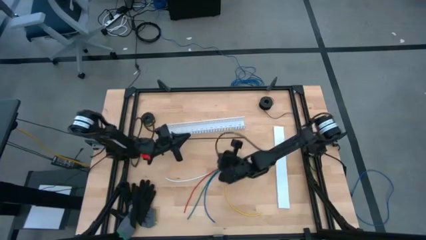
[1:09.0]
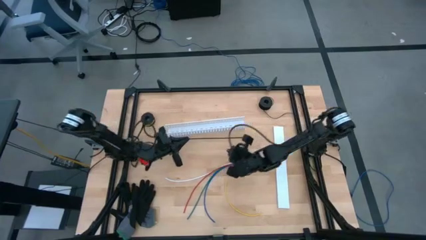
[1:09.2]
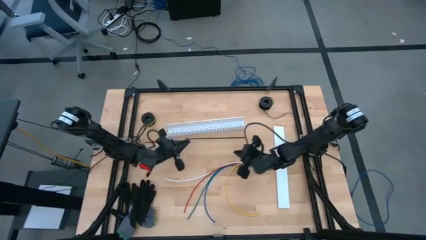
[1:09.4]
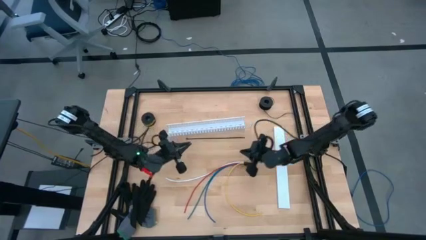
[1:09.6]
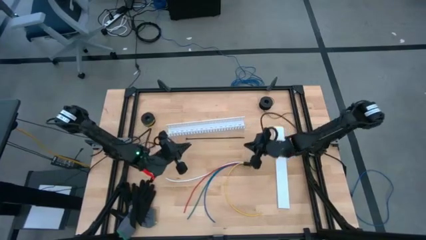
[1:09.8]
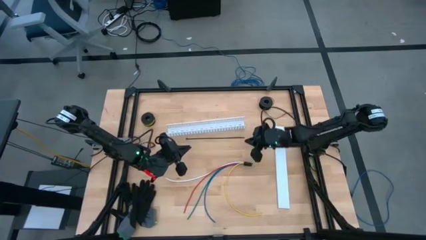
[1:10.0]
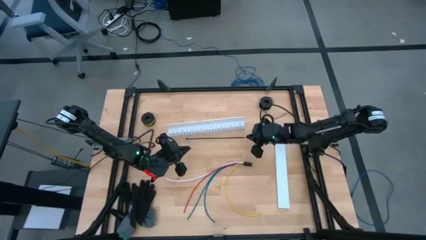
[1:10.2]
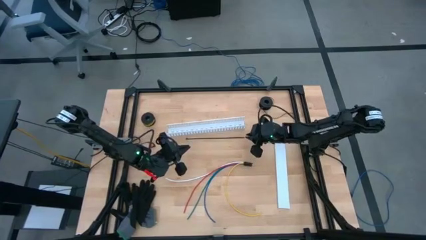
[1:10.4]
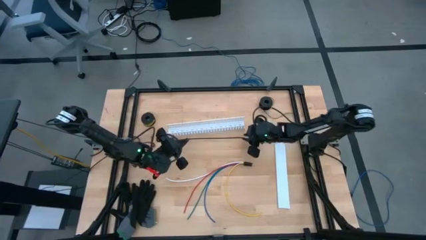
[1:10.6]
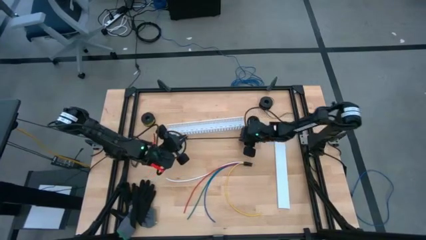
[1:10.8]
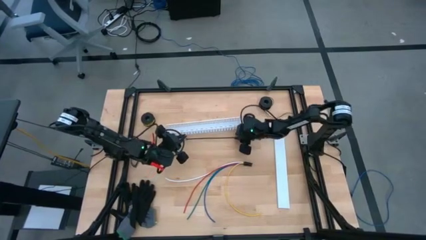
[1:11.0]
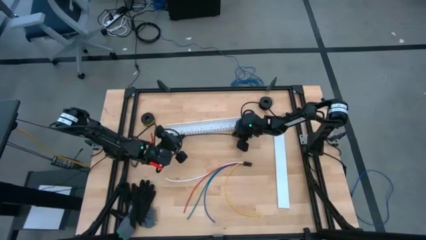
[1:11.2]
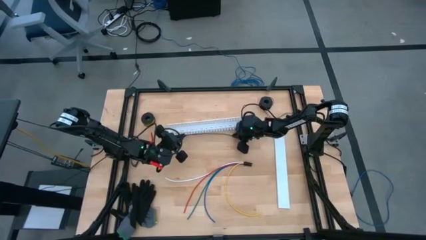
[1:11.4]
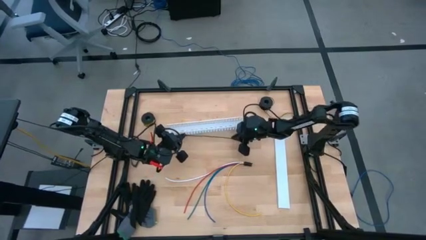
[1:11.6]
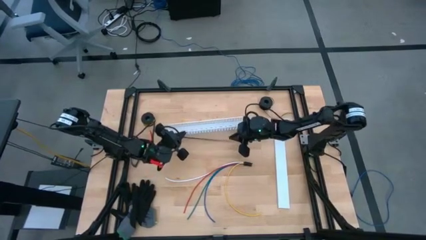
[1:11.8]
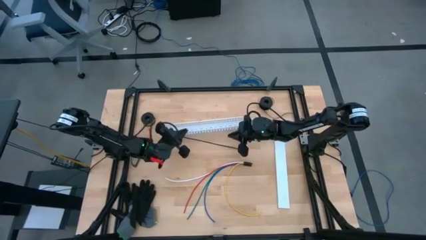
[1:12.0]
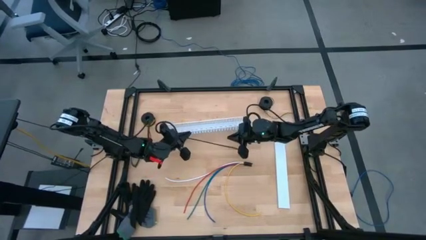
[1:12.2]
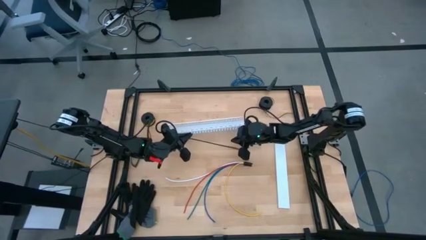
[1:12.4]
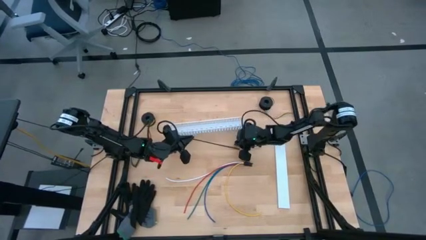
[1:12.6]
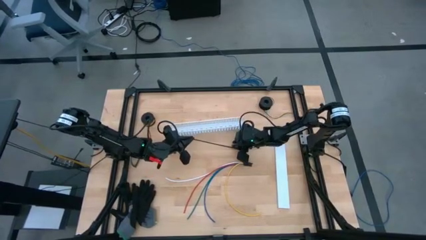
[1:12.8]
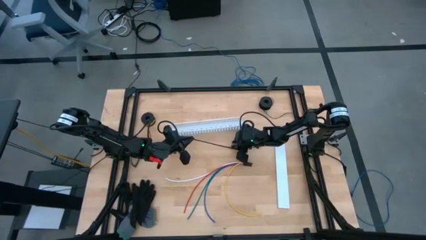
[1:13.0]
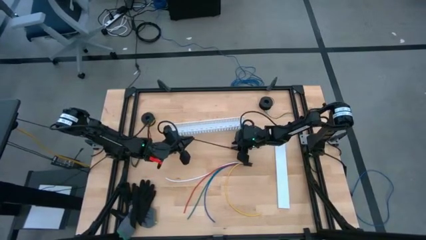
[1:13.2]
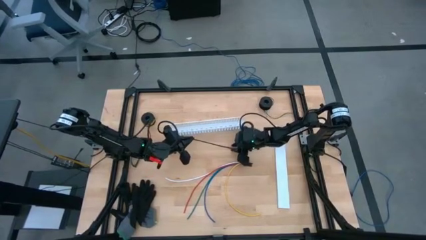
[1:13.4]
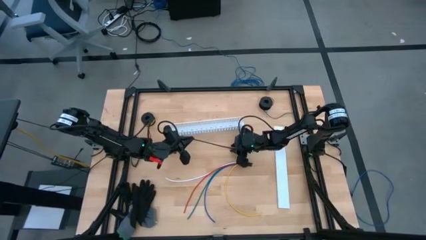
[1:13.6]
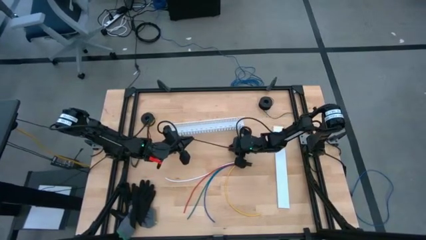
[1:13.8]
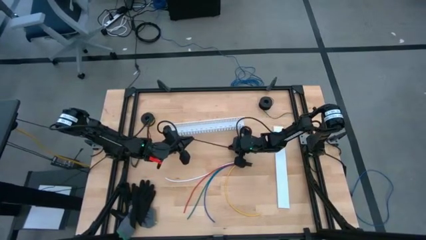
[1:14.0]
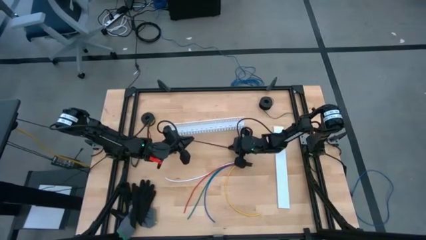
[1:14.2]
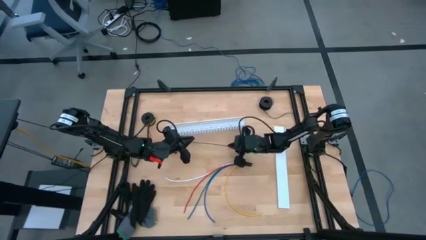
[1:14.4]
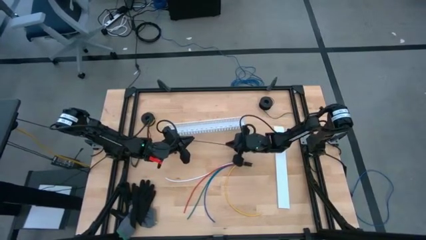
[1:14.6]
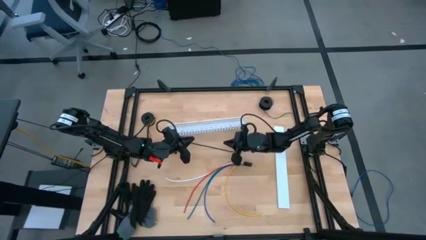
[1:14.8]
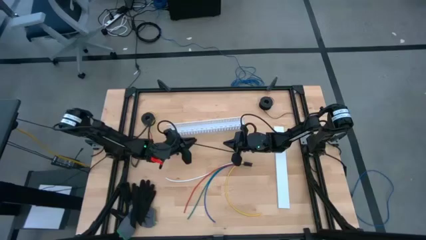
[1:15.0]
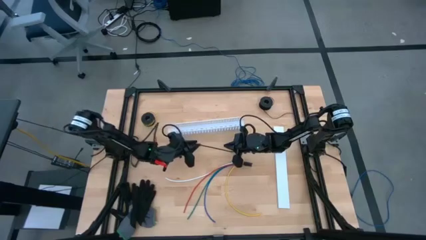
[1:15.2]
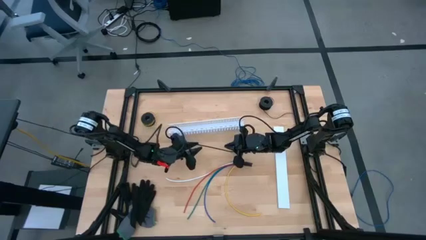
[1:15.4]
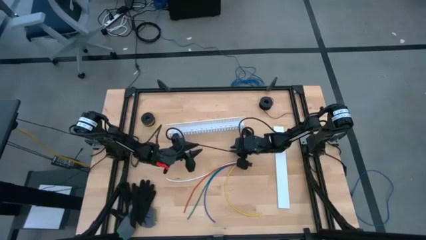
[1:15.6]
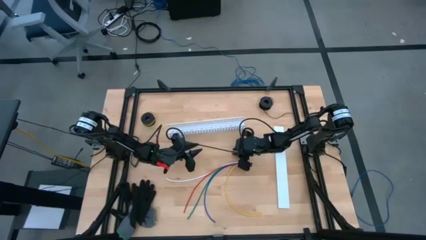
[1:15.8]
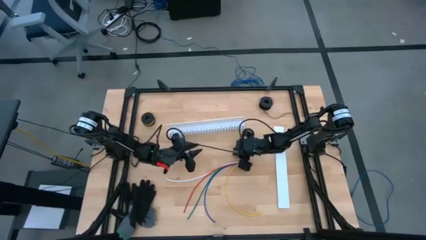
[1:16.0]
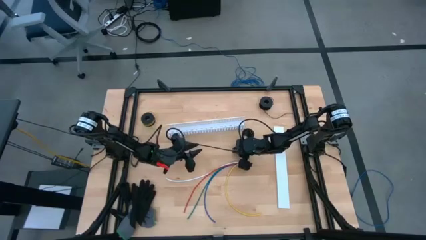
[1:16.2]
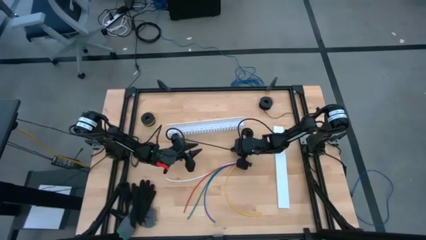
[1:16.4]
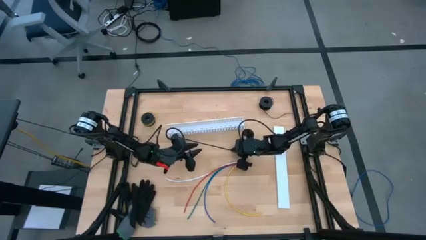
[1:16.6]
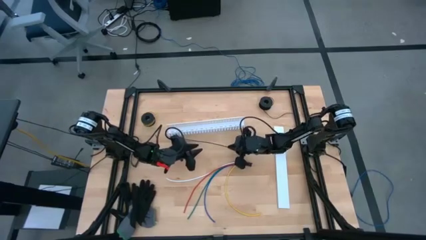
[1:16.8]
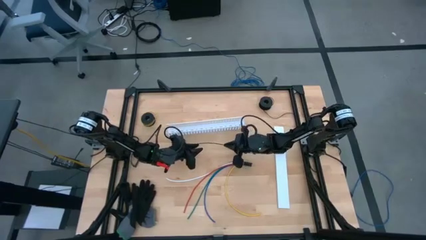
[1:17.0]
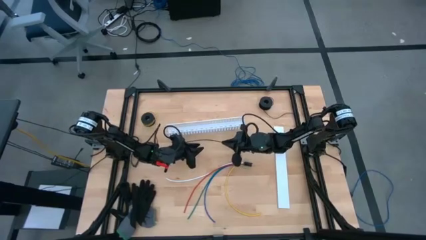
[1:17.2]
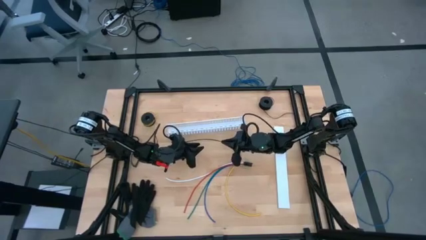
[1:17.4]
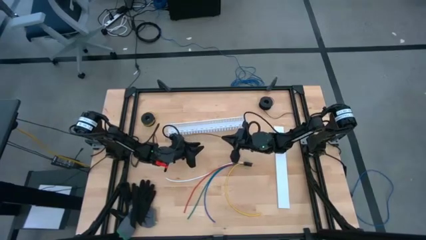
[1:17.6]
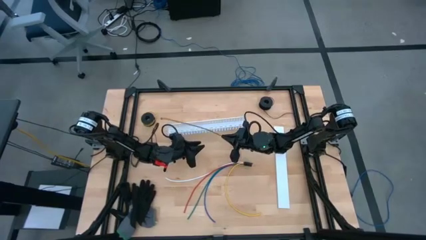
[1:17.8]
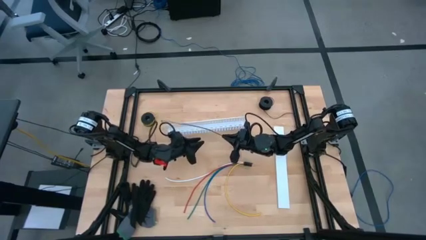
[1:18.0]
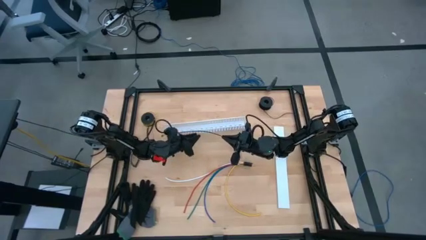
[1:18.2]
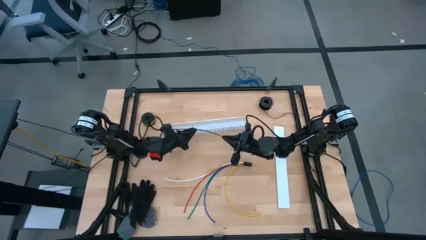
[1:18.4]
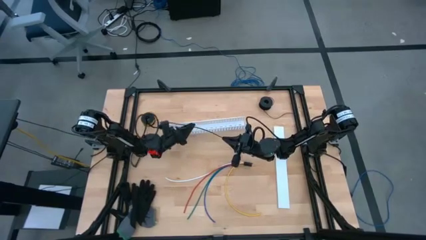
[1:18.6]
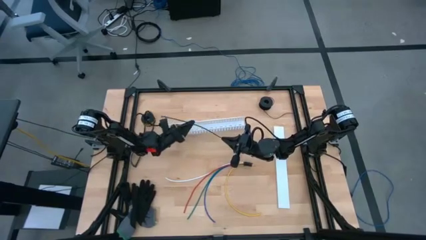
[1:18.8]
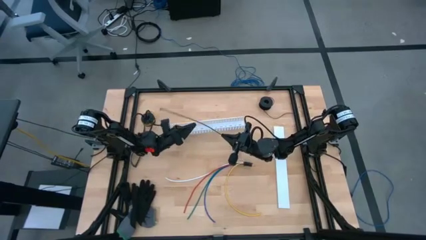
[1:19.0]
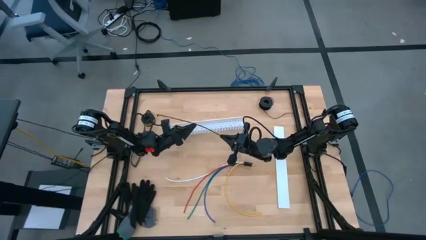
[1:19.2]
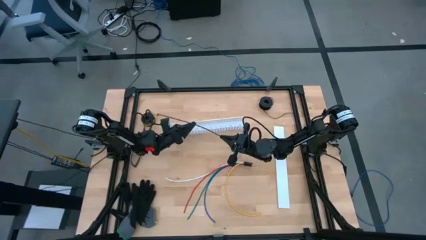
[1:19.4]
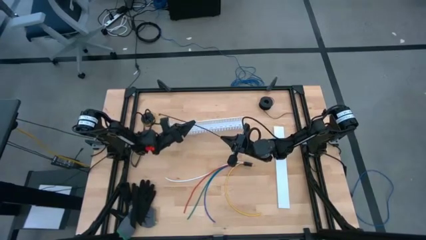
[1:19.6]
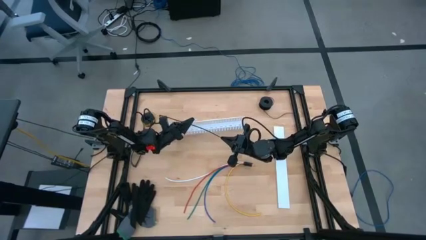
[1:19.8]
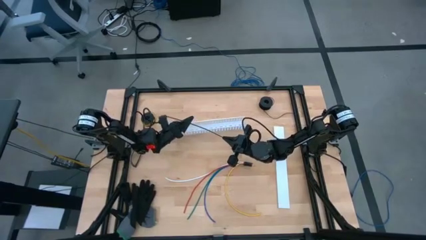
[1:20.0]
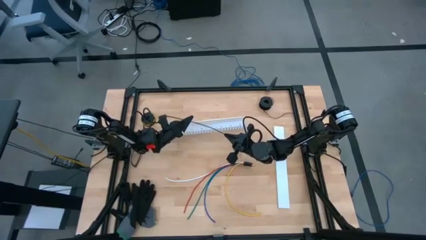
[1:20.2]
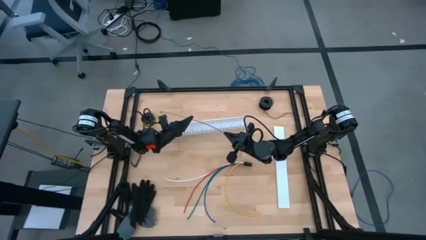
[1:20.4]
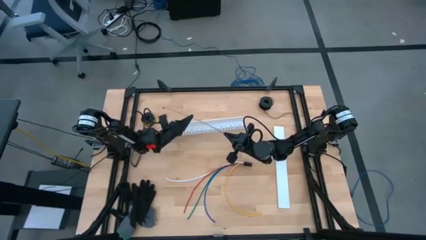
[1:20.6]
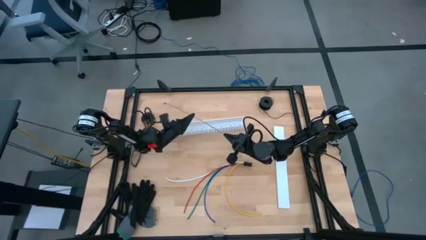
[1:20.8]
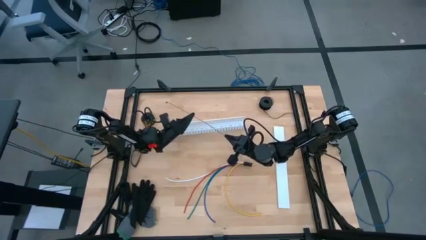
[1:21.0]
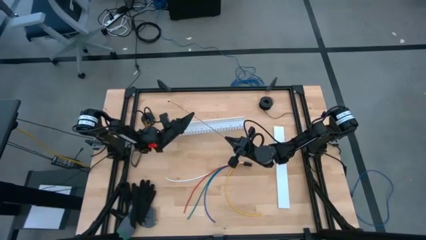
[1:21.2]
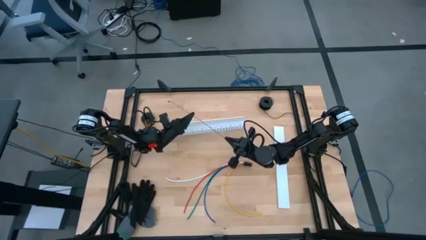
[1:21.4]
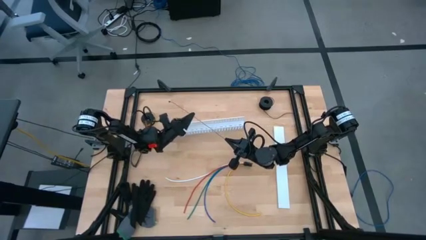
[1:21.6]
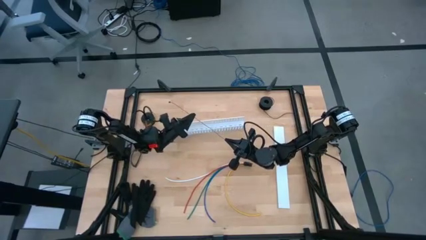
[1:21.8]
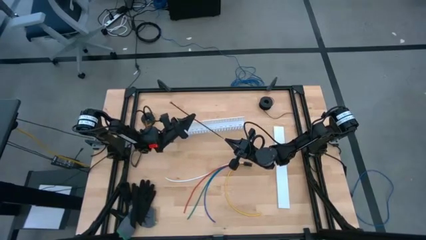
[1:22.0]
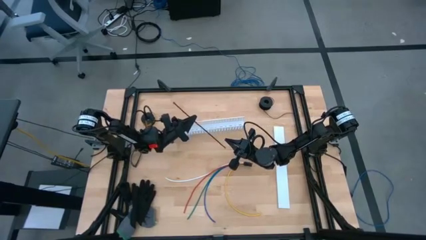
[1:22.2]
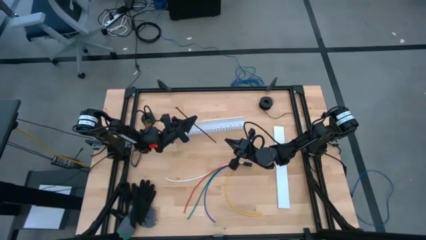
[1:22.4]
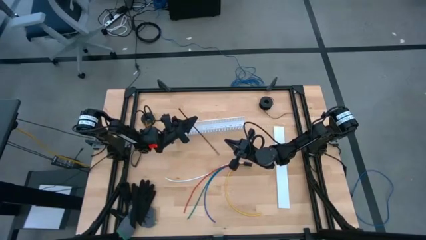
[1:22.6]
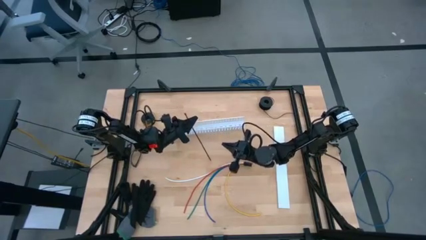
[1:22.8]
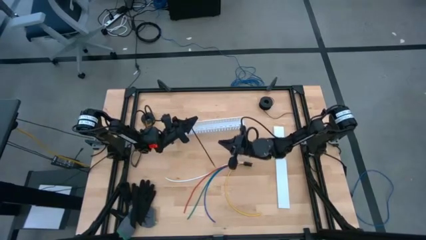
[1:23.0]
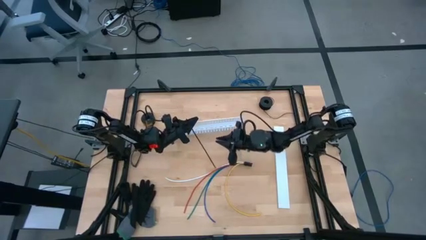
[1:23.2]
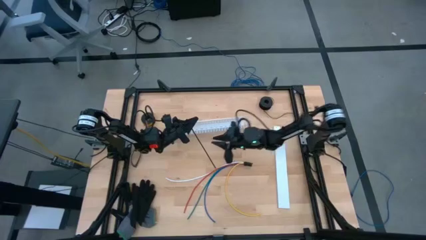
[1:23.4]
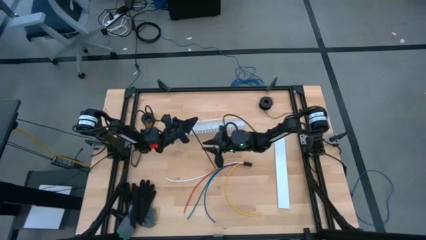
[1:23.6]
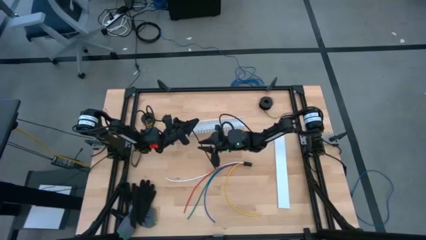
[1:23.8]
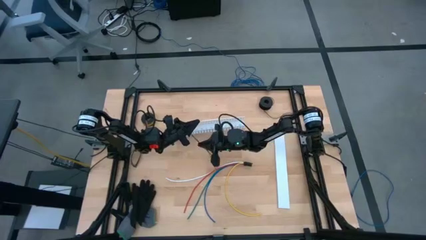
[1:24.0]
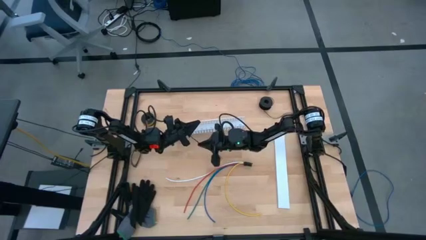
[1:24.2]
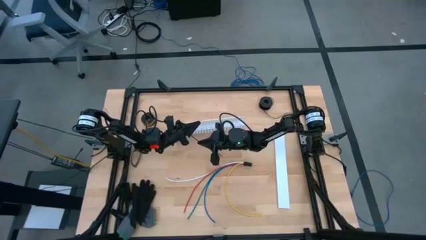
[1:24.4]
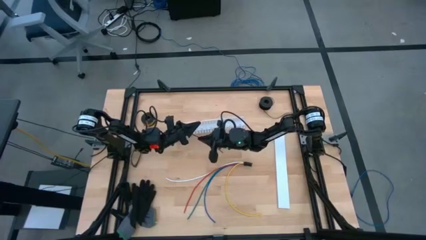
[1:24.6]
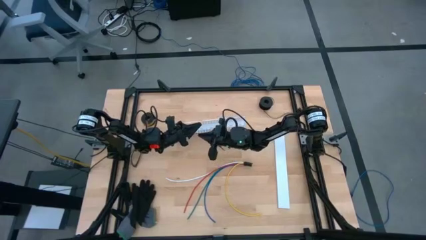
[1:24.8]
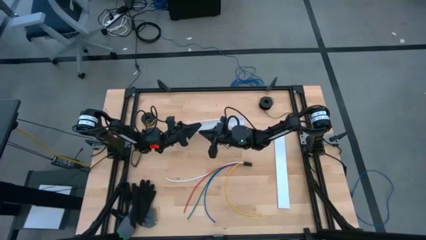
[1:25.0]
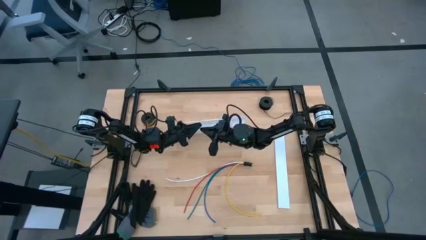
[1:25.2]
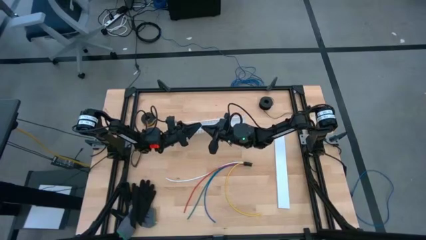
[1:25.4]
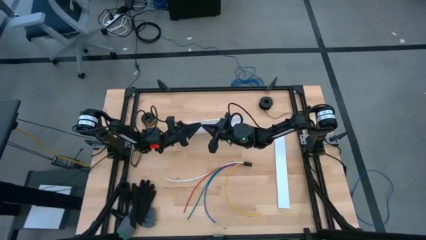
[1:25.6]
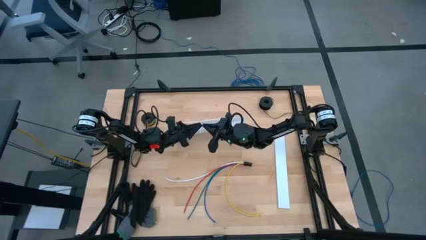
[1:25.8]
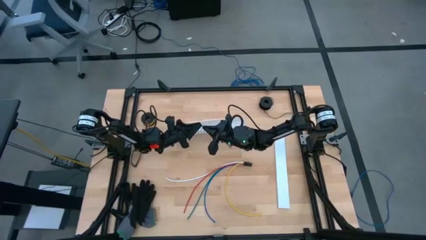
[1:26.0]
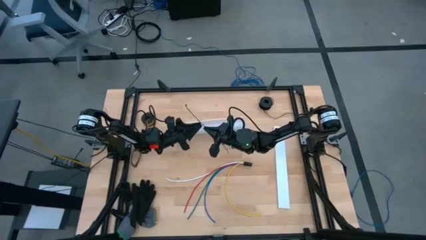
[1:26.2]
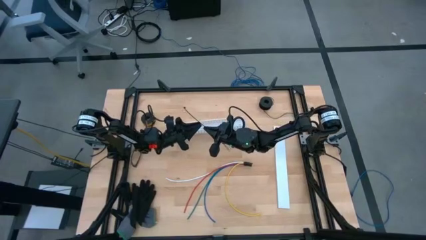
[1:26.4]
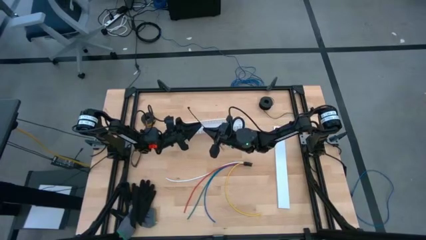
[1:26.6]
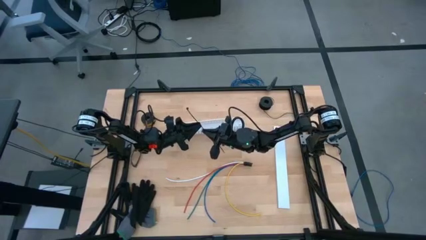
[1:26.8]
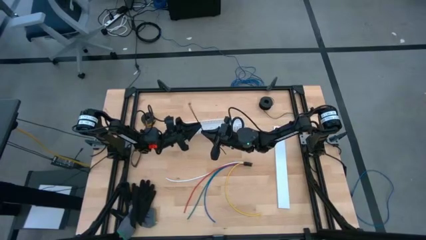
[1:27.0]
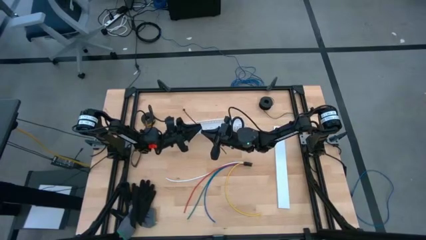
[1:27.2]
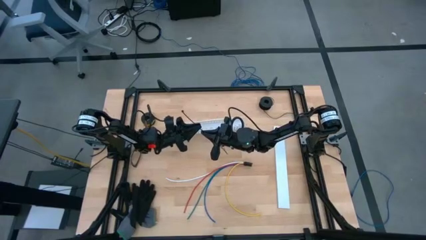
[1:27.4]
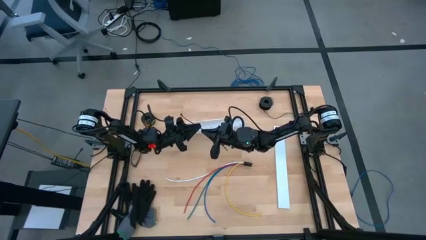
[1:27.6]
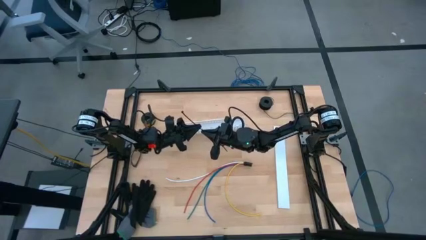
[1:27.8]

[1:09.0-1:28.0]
Task: Ziptie cables
Insert zip tie on the cable wire
